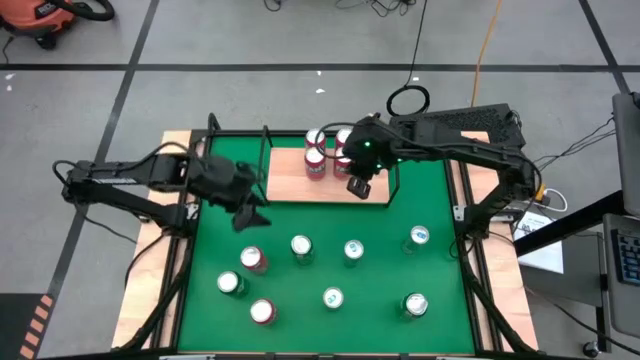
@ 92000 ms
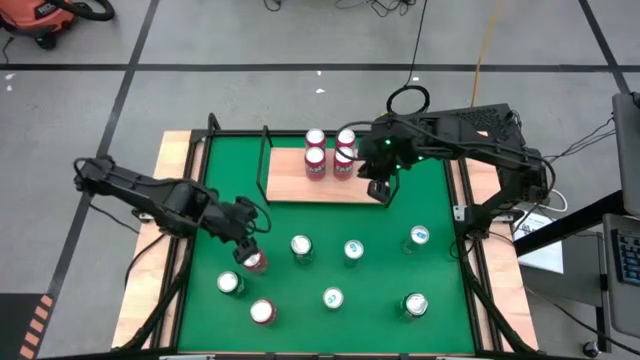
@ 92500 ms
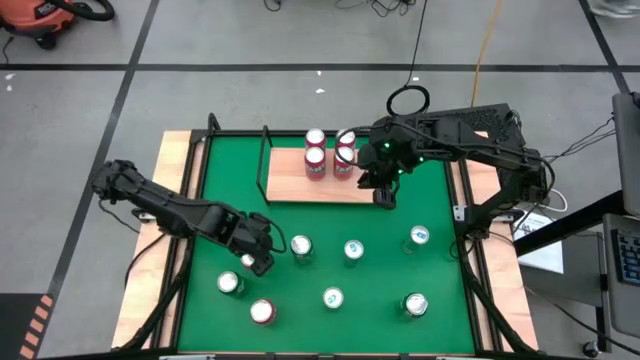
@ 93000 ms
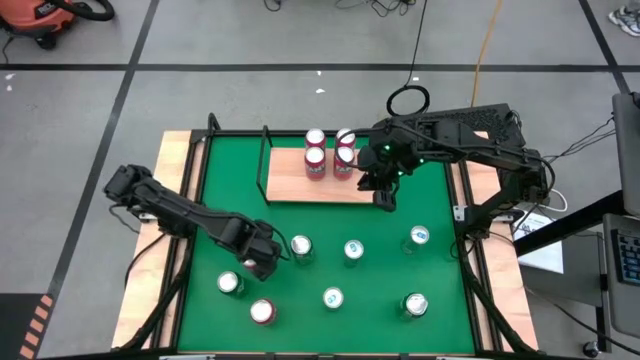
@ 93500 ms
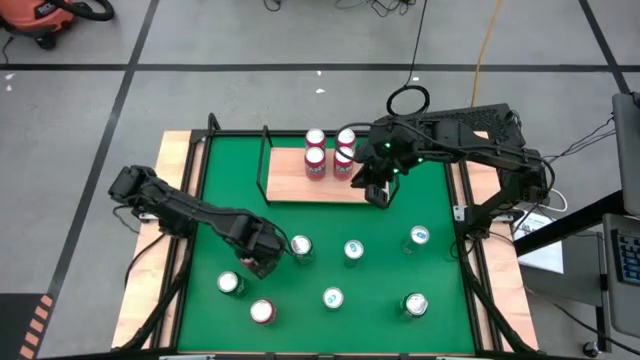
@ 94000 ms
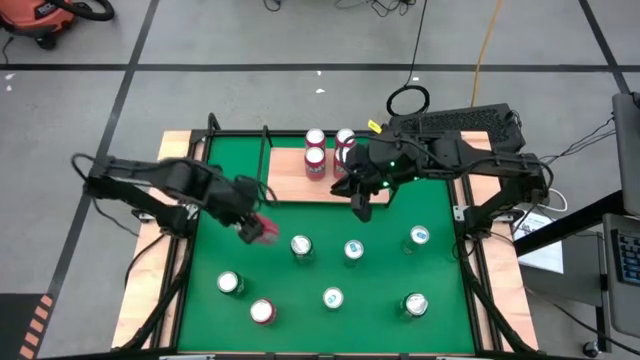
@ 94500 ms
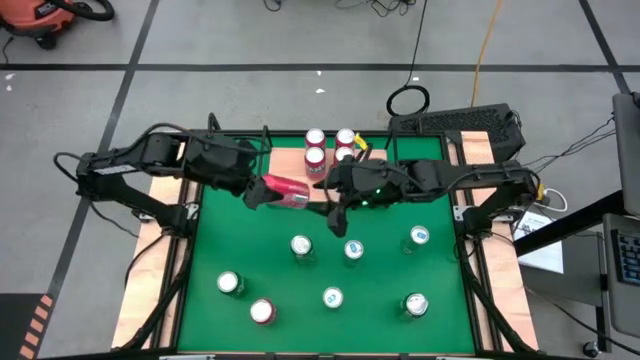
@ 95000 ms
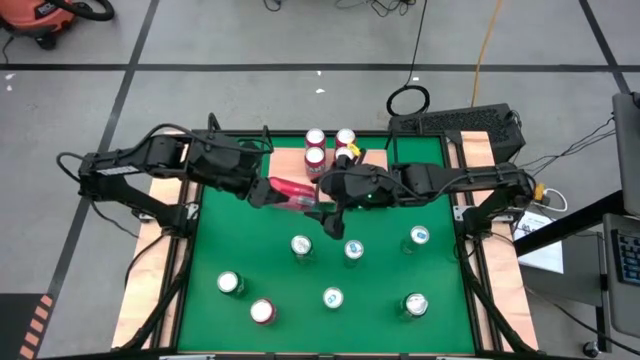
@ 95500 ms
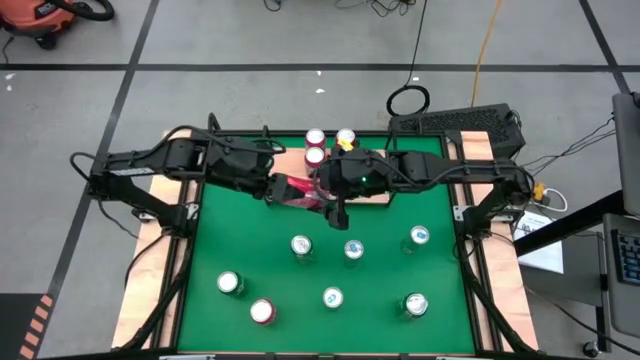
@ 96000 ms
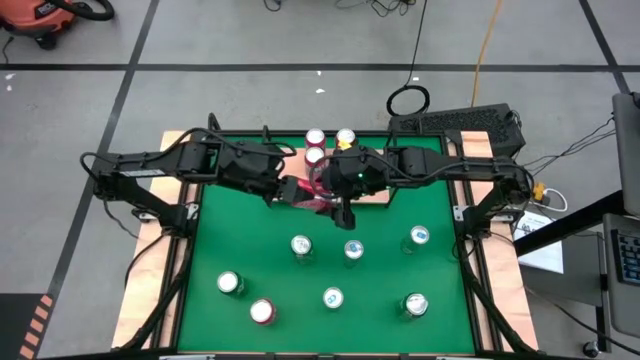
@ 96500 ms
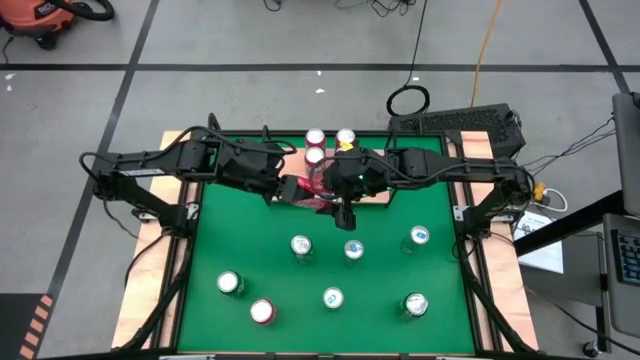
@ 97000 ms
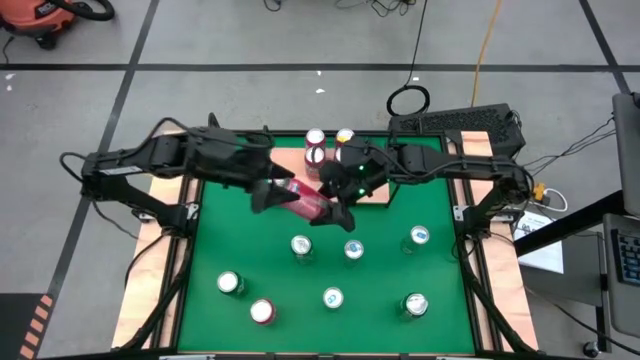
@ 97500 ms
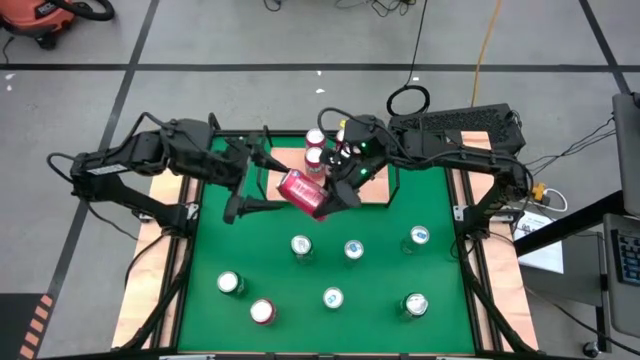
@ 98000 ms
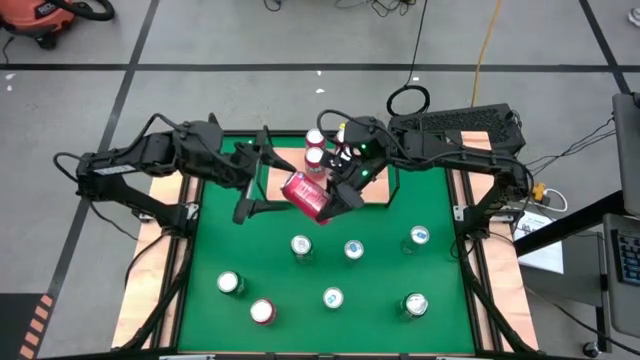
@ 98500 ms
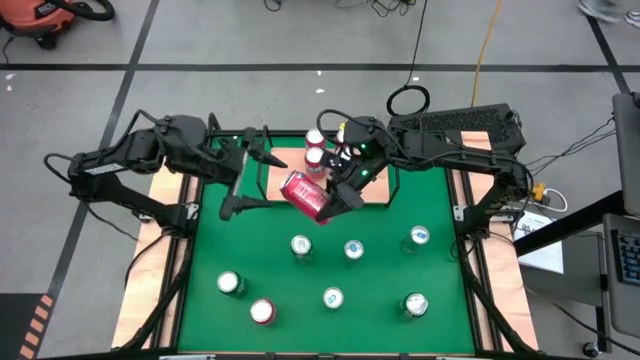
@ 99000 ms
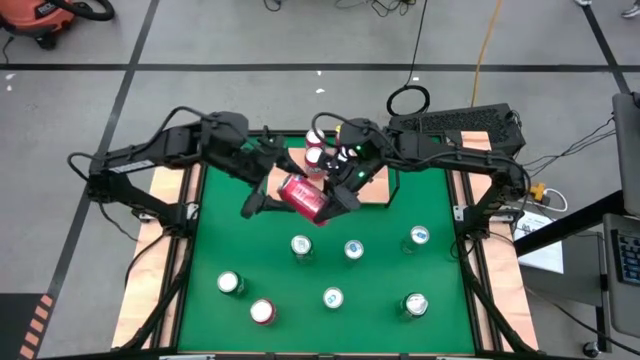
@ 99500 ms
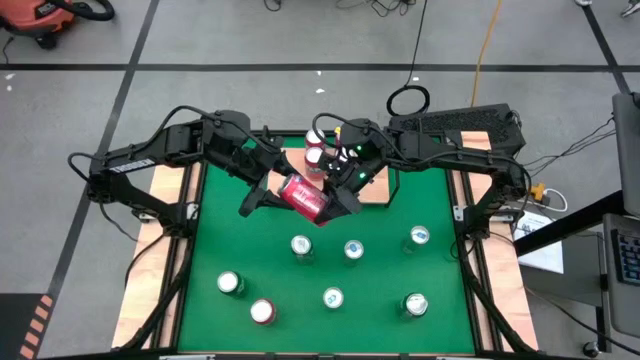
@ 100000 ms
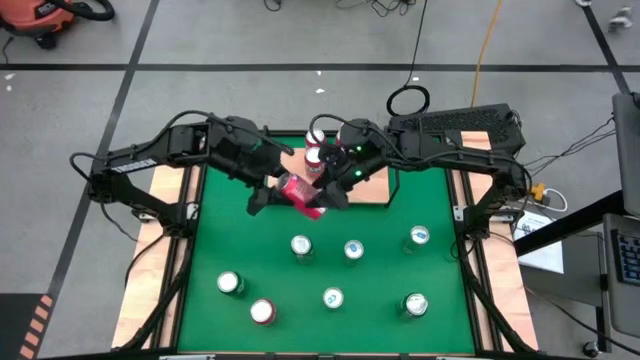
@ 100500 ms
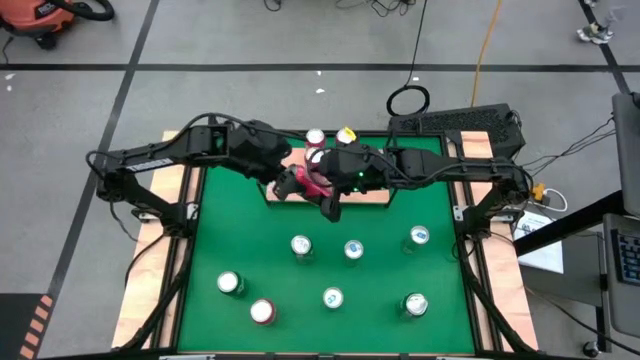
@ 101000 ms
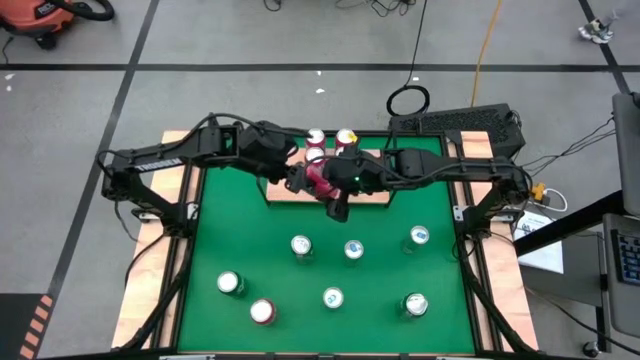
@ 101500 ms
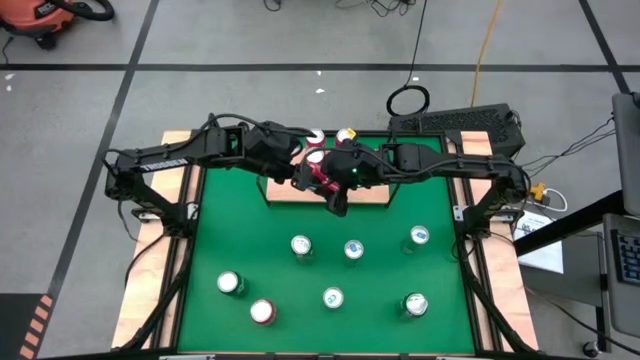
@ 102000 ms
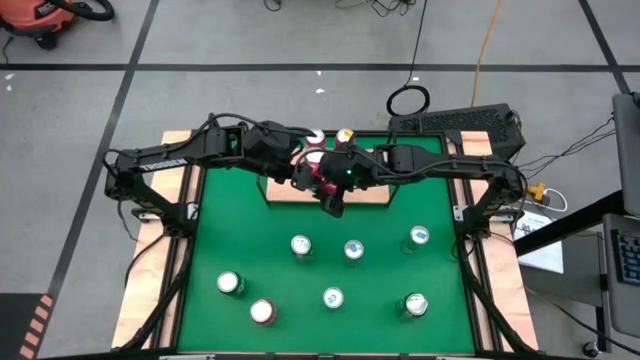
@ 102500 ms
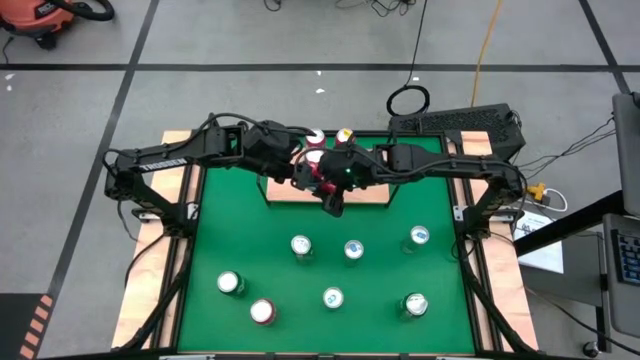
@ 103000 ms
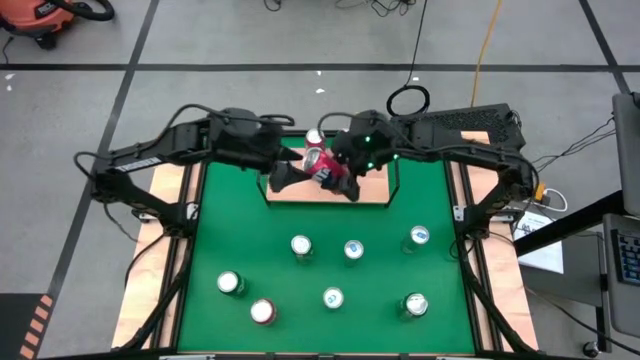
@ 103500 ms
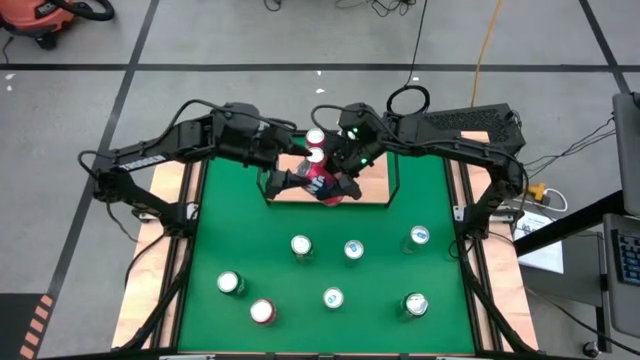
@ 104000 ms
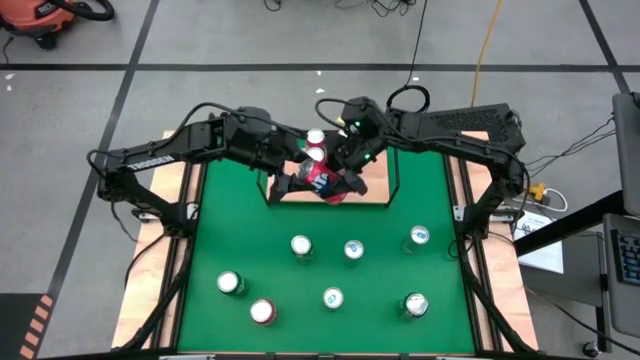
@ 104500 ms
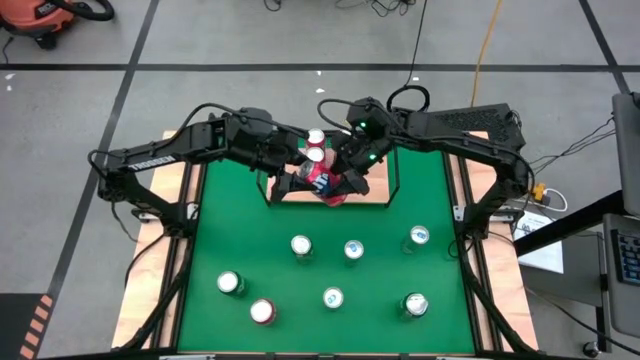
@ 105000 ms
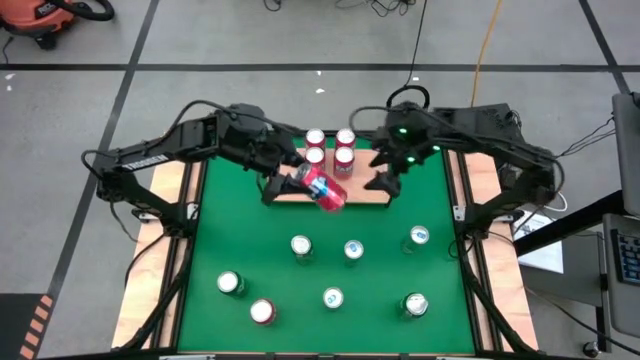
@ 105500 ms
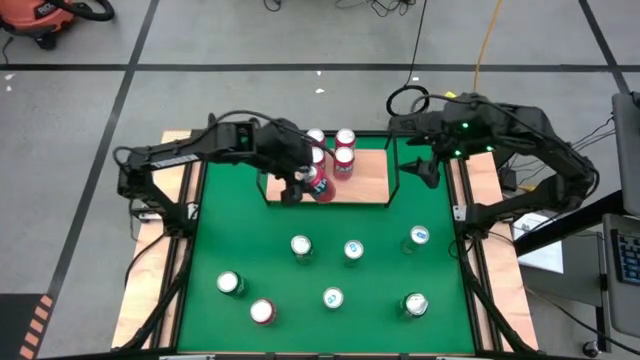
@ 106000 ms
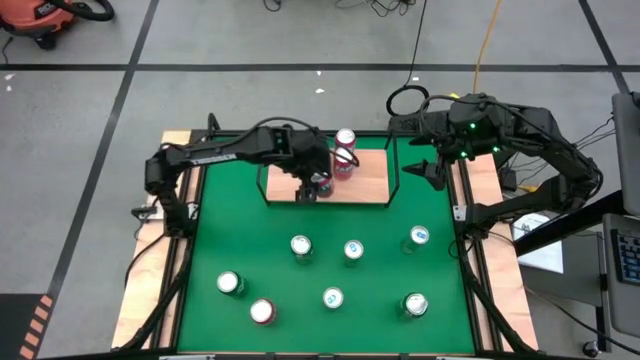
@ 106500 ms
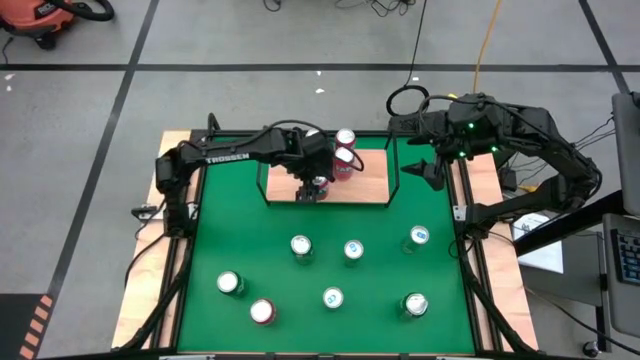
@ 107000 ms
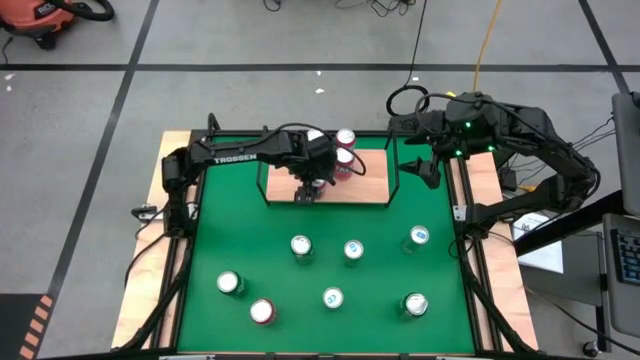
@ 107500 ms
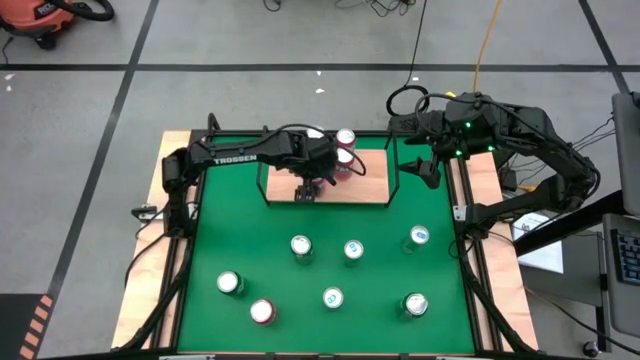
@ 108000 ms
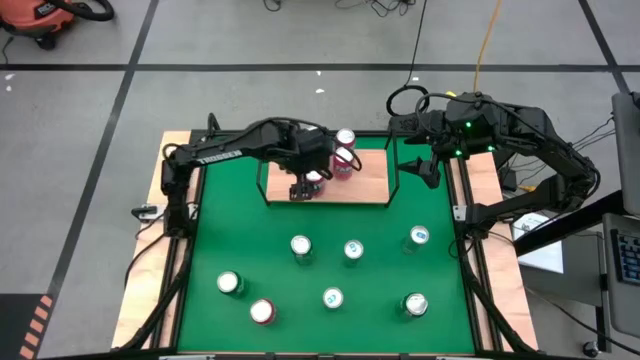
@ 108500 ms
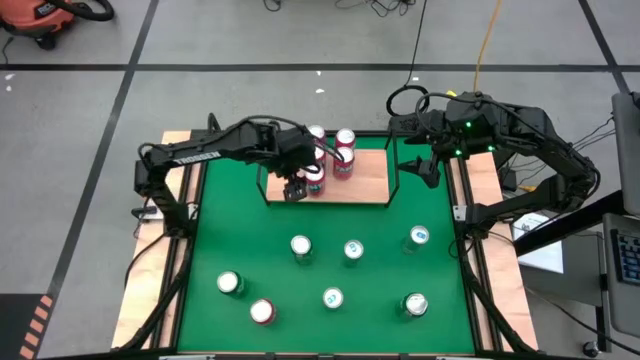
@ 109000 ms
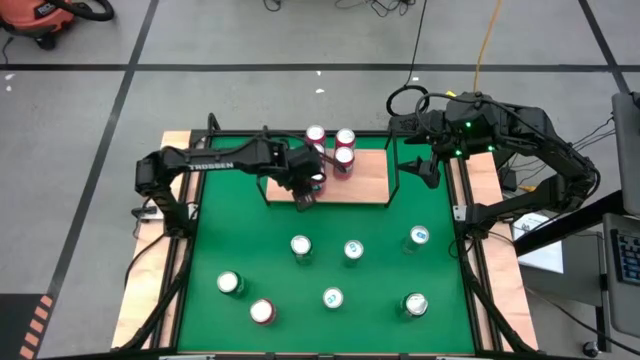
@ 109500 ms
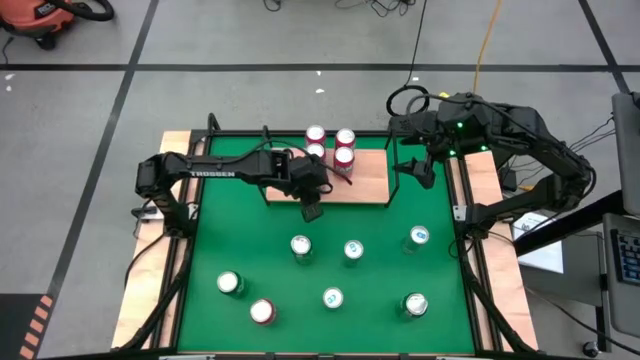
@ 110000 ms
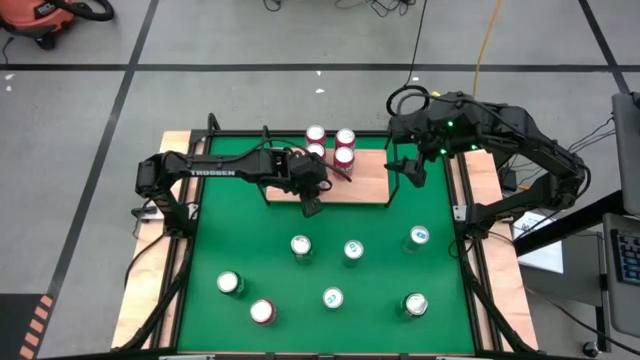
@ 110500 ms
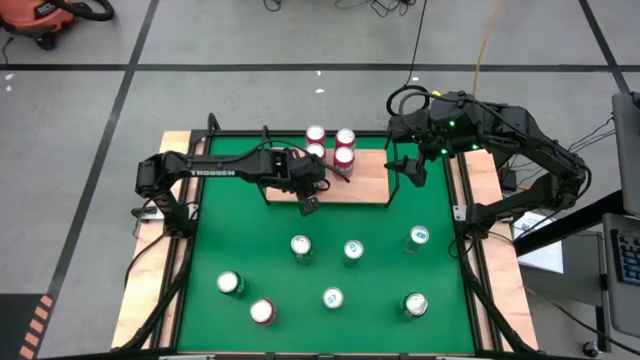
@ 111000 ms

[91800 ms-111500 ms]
Task: Place canned beverage on shelf
Put the red soda can on the shelf aligned with the other left red soda can

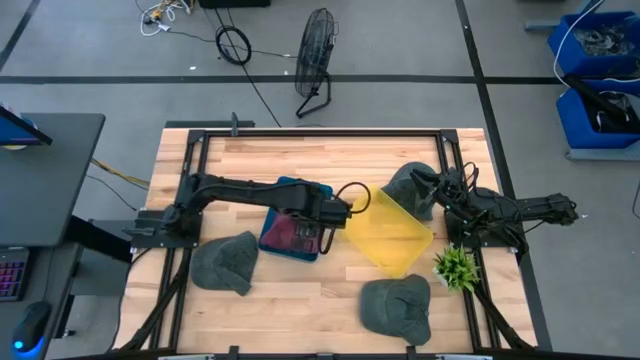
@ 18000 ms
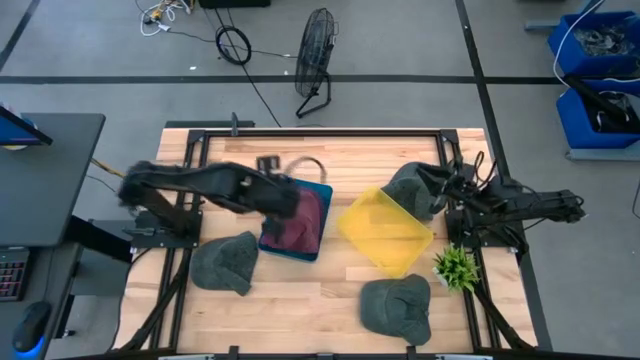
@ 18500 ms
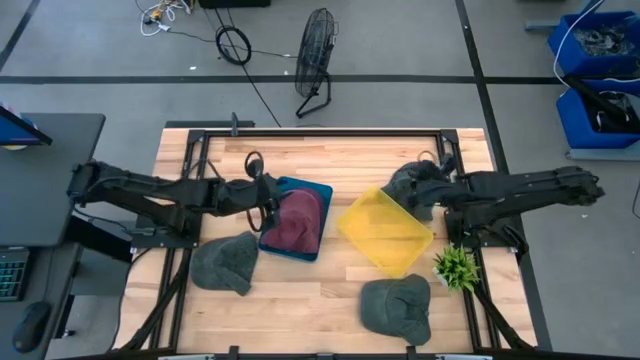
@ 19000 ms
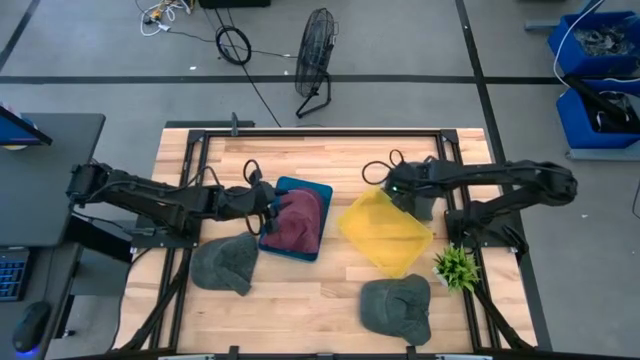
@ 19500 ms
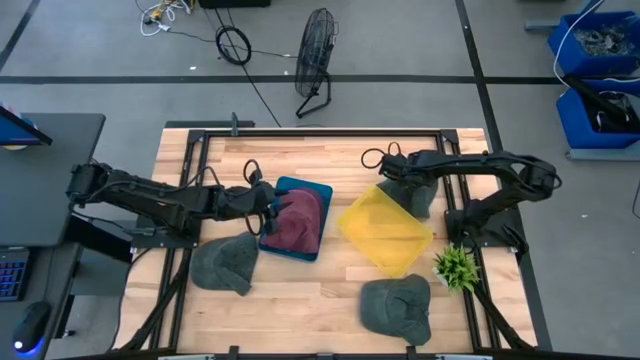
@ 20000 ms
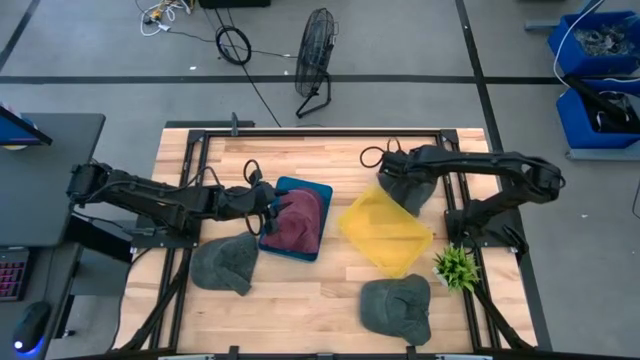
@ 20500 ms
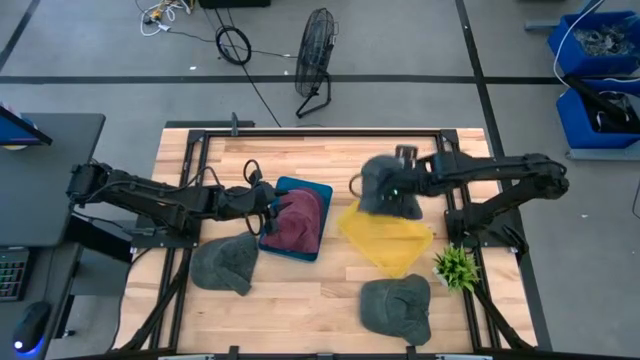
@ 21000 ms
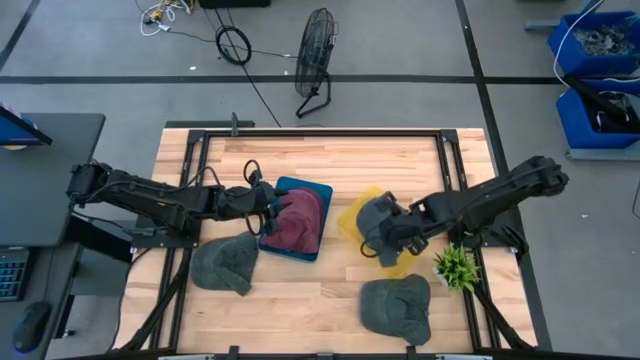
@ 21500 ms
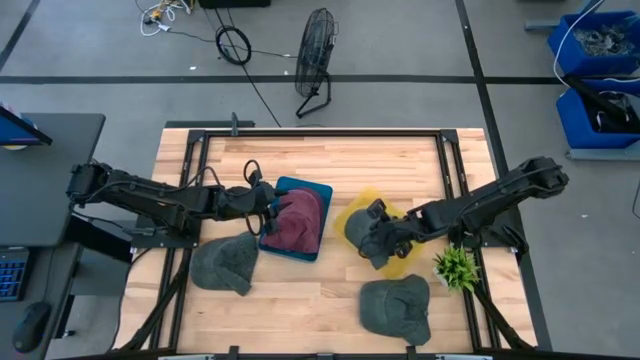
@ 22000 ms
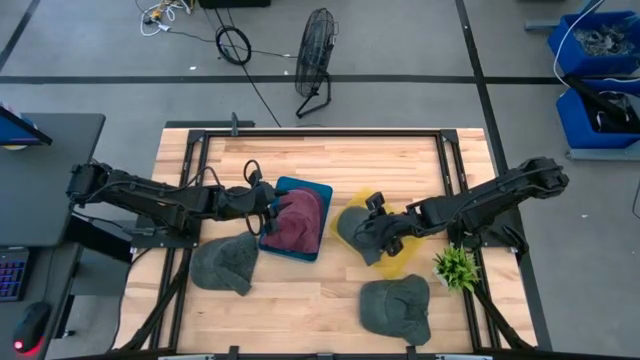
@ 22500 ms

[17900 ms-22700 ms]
Task: Pick & Place hat
Put the top gray cap into the yellow bin
